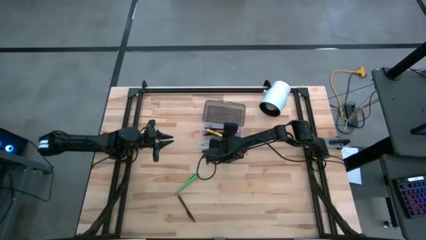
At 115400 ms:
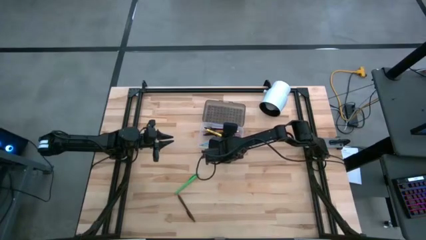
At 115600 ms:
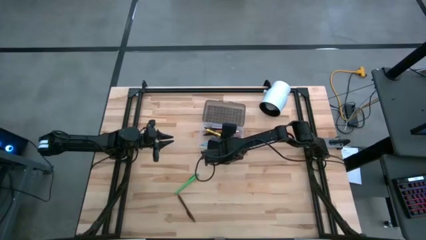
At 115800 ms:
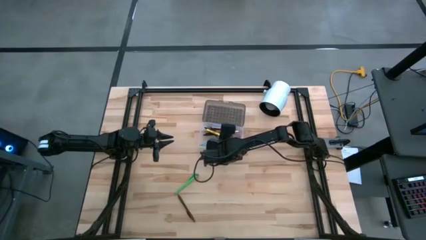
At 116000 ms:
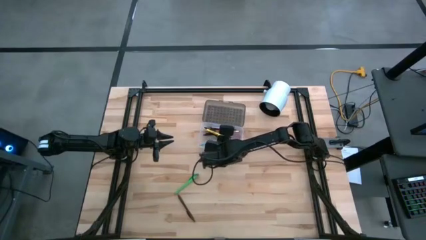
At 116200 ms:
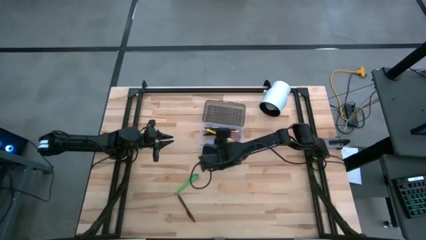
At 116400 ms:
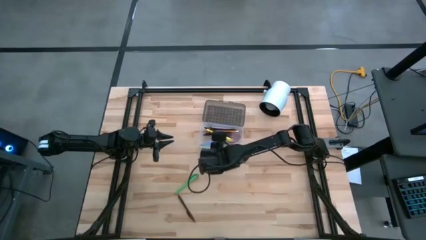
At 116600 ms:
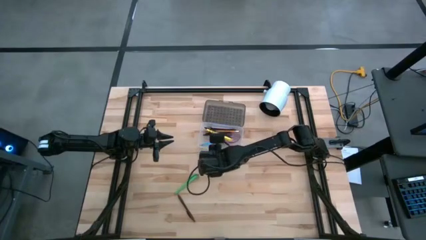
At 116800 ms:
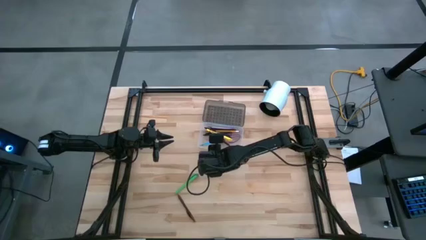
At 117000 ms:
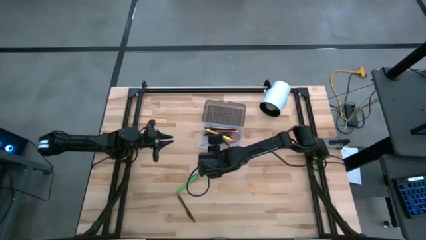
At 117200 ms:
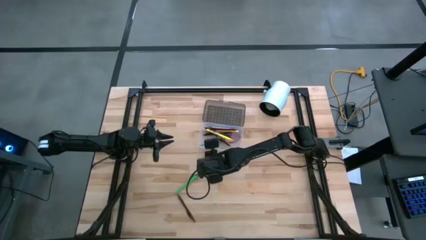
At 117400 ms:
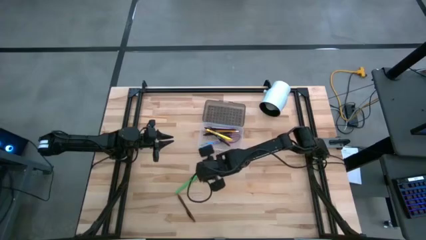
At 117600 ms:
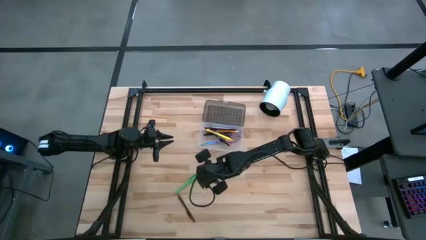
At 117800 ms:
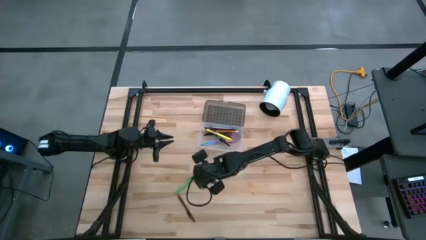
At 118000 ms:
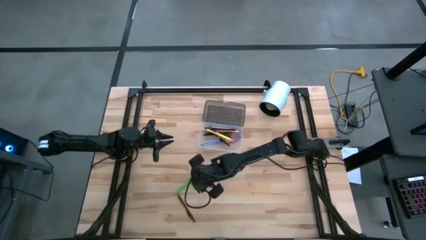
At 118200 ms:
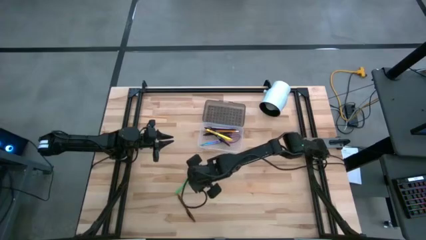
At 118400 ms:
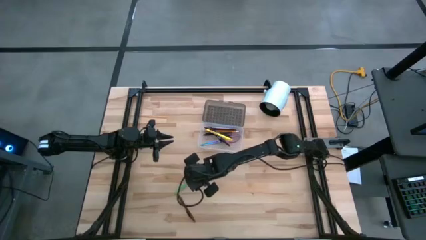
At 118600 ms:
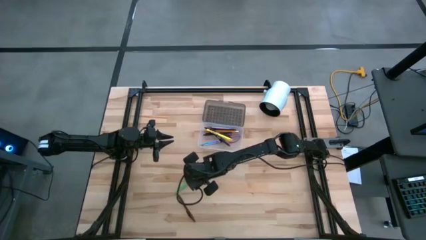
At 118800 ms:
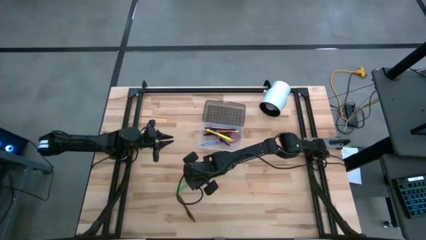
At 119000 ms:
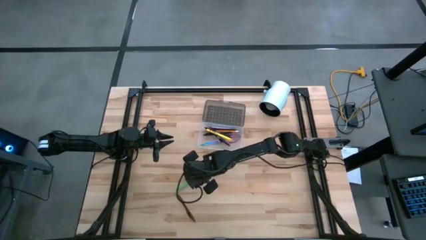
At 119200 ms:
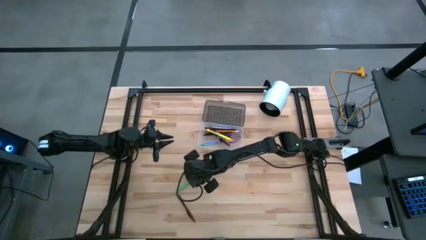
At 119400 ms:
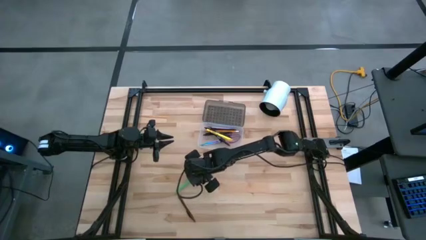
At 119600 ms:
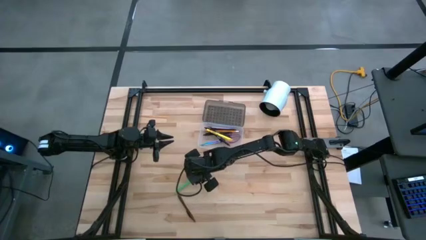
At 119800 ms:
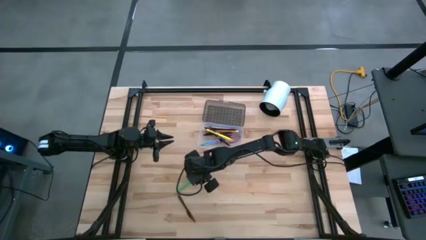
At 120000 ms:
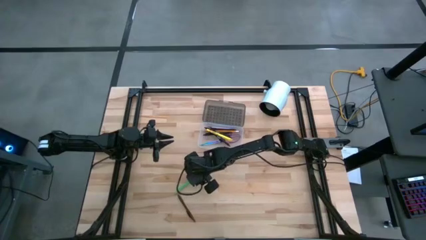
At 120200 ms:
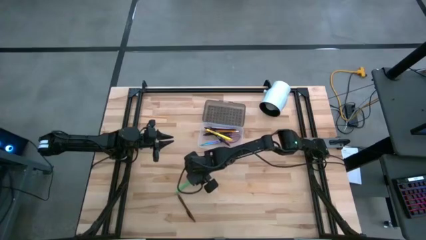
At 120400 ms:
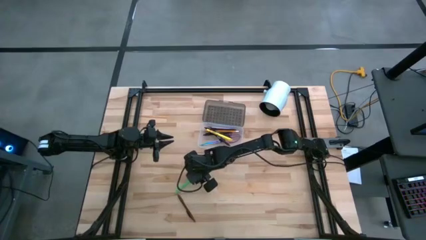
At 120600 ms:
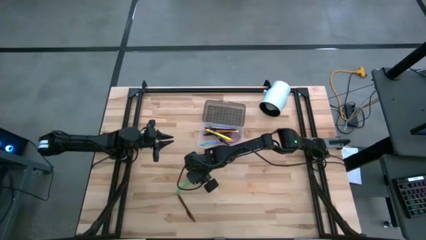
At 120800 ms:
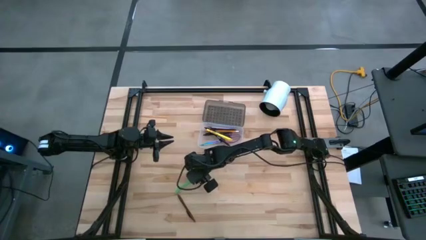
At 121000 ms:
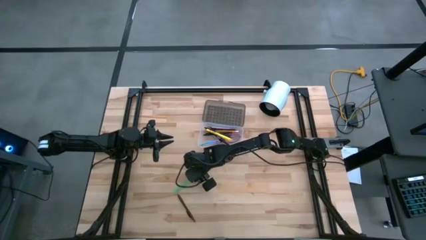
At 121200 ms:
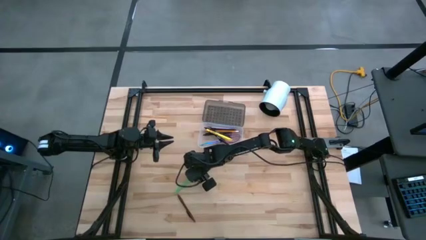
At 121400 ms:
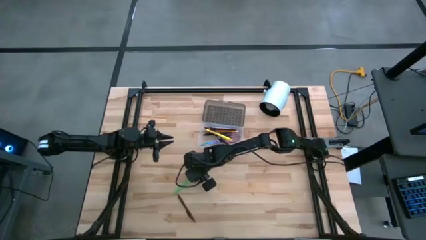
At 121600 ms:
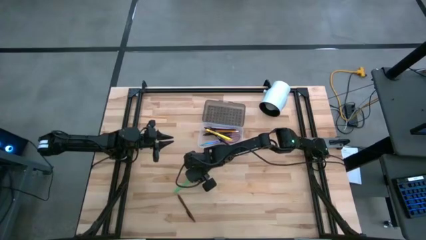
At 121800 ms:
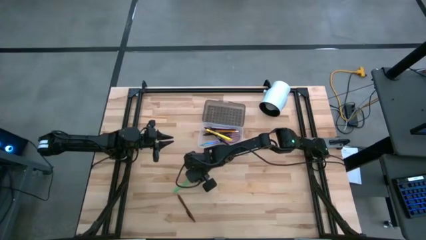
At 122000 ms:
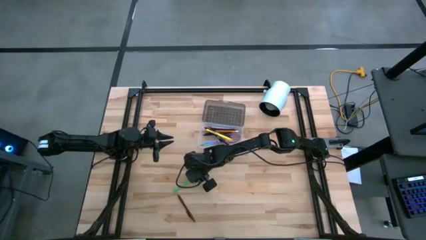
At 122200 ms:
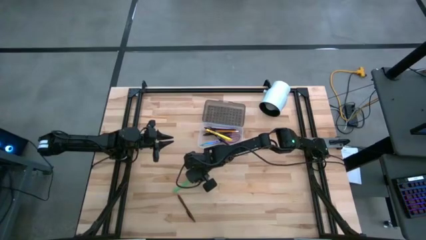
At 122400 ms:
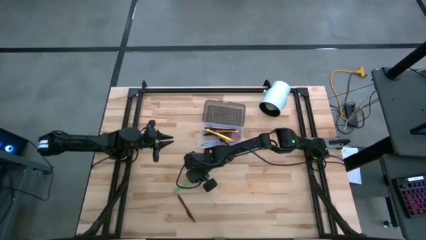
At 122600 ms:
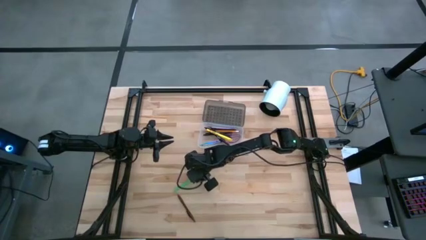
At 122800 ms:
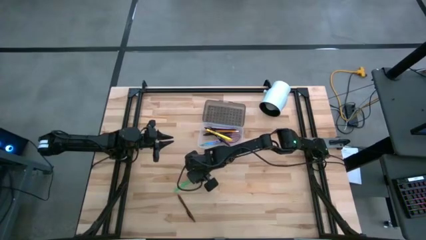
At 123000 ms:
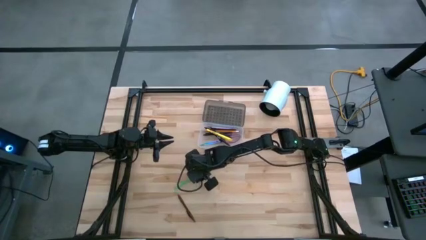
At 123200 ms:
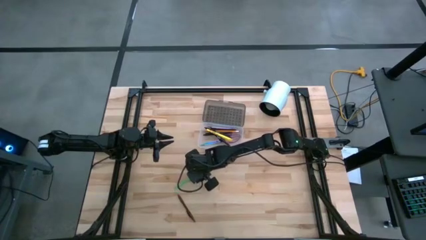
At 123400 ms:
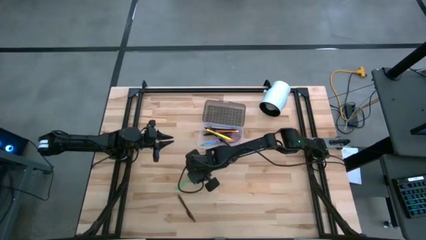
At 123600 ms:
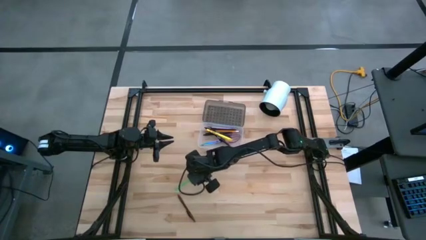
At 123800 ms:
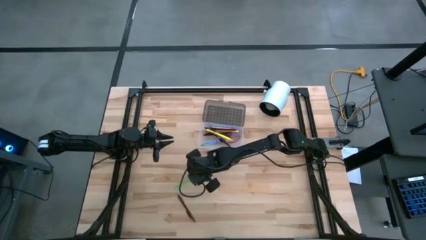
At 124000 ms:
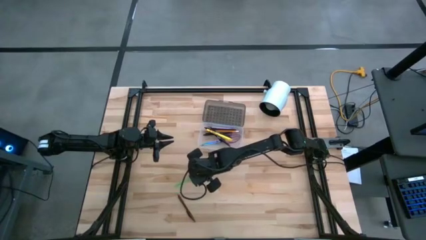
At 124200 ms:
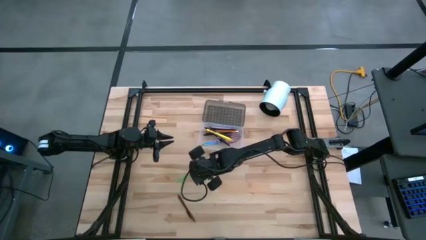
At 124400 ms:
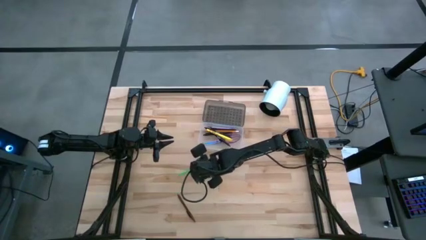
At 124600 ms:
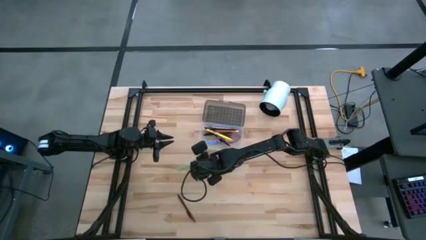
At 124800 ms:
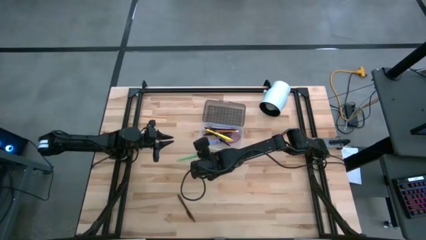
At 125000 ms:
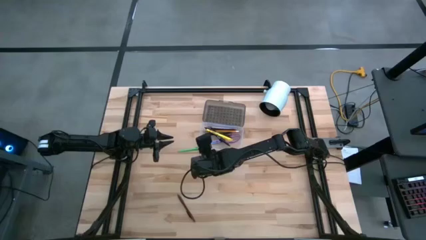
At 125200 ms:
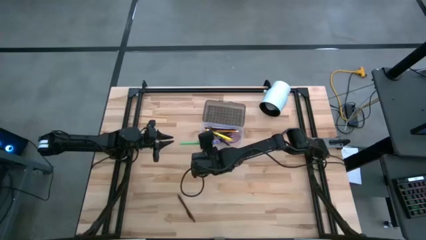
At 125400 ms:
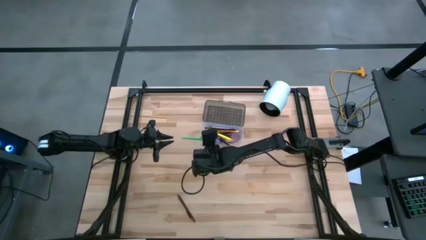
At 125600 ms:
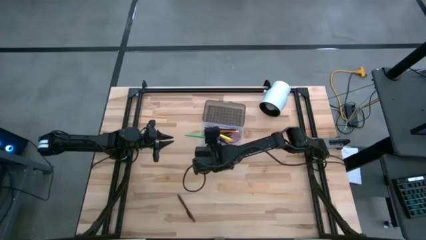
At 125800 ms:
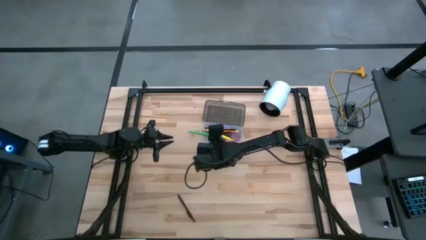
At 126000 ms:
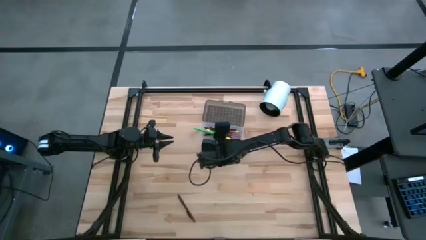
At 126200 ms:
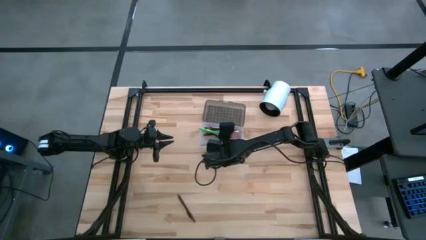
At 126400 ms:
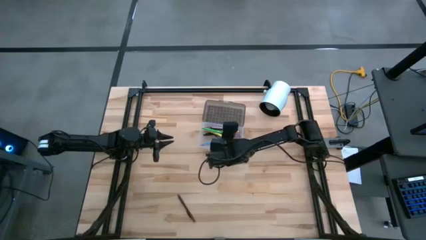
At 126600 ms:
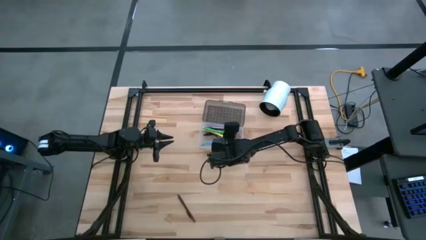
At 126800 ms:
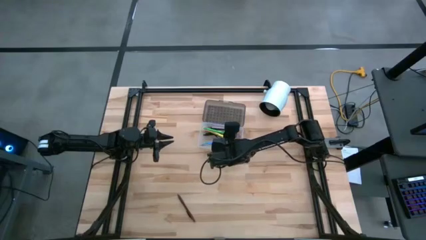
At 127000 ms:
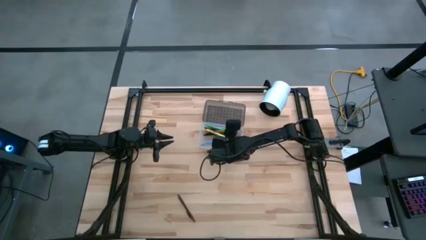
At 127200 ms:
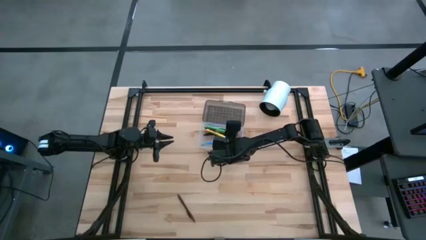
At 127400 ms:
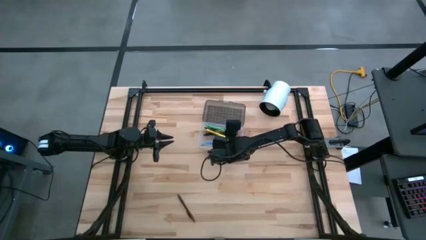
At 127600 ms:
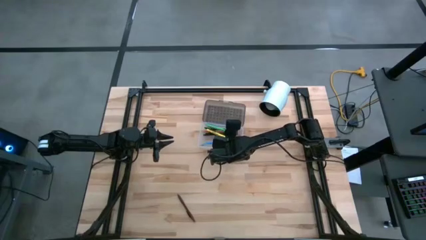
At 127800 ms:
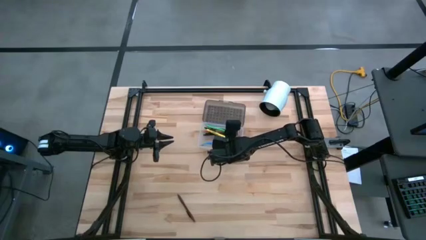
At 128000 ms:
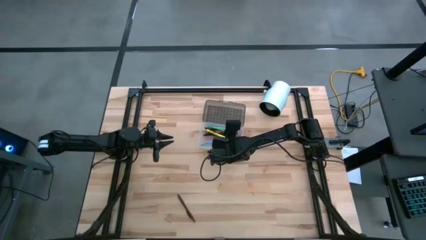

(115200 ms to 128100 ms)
Task: Pick & place school supplies into a supply box
Put the green pen into the supply box
